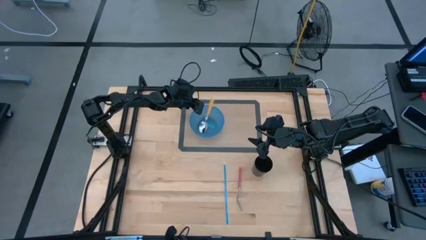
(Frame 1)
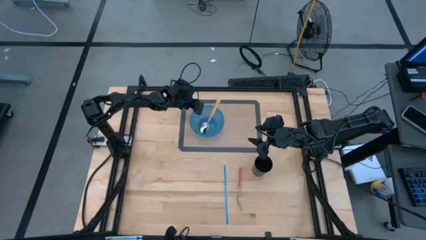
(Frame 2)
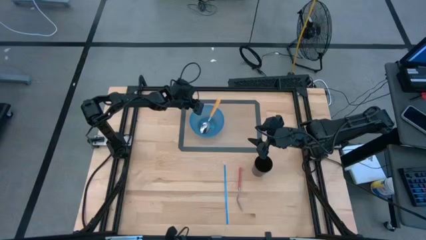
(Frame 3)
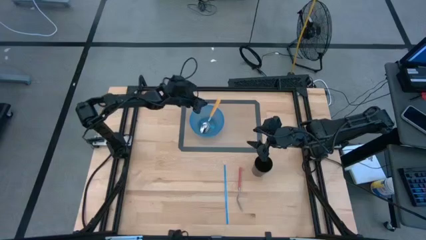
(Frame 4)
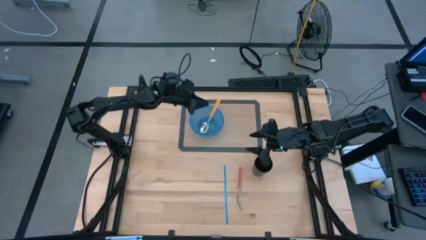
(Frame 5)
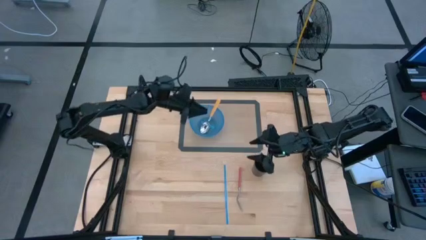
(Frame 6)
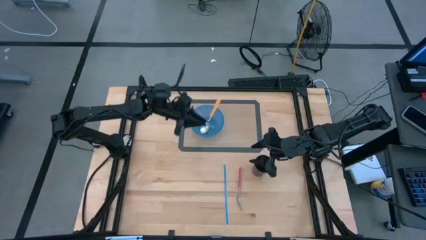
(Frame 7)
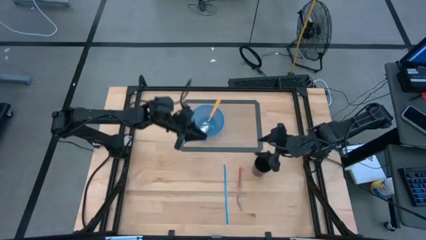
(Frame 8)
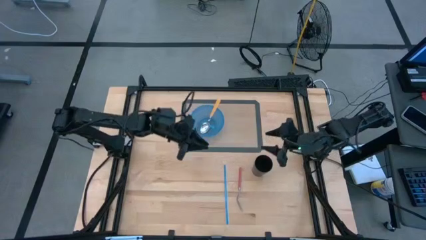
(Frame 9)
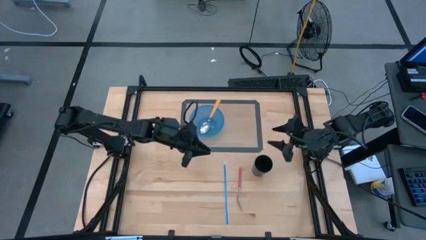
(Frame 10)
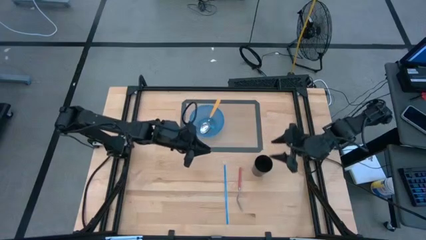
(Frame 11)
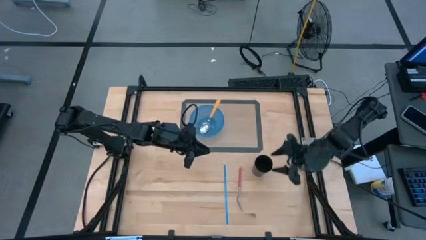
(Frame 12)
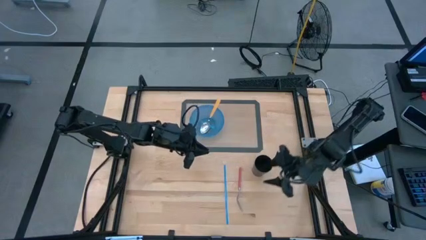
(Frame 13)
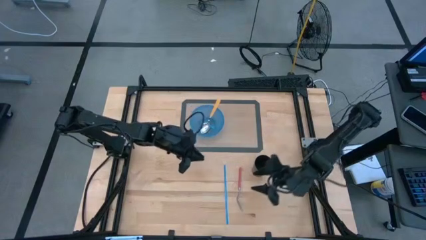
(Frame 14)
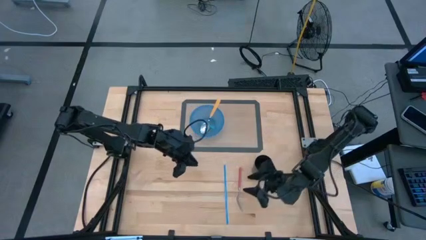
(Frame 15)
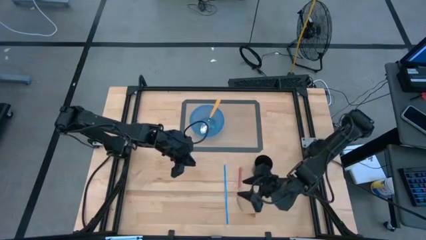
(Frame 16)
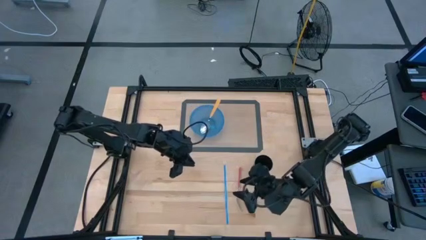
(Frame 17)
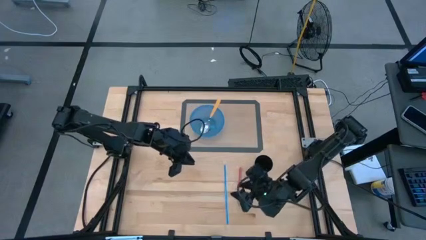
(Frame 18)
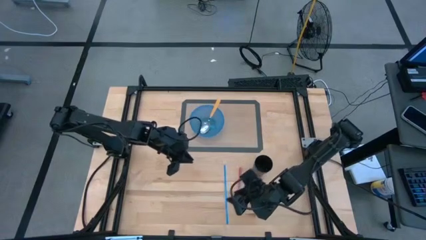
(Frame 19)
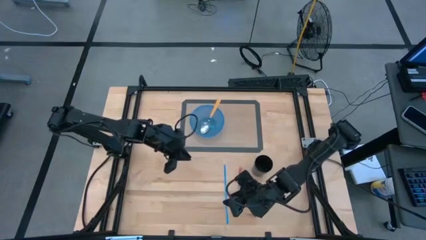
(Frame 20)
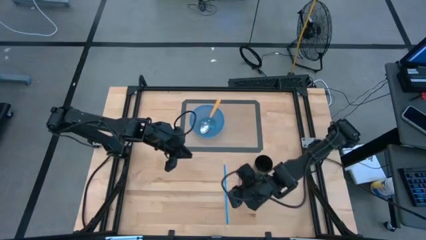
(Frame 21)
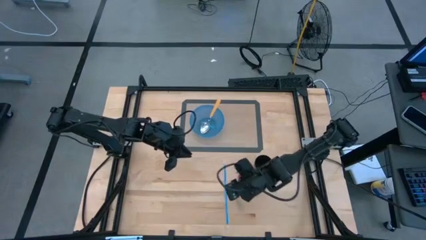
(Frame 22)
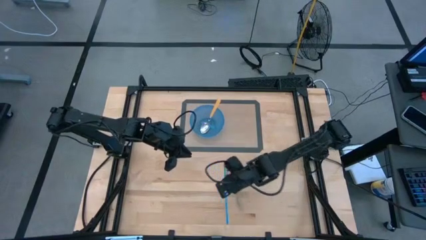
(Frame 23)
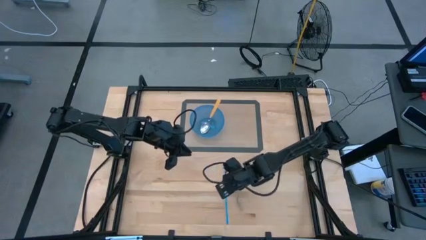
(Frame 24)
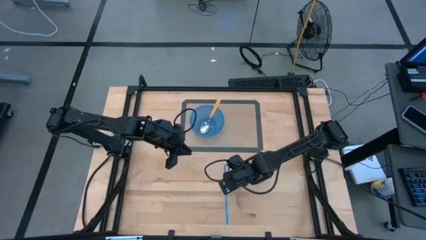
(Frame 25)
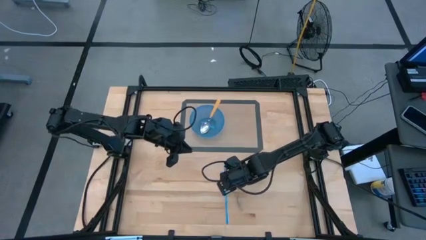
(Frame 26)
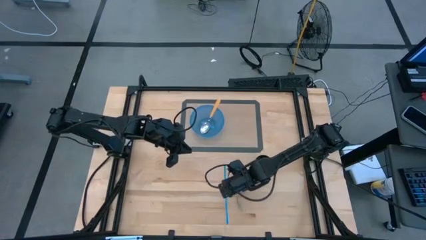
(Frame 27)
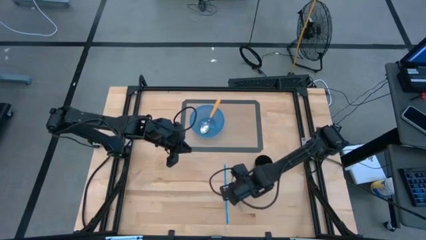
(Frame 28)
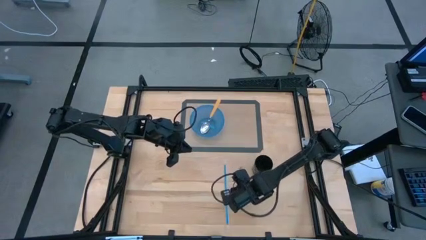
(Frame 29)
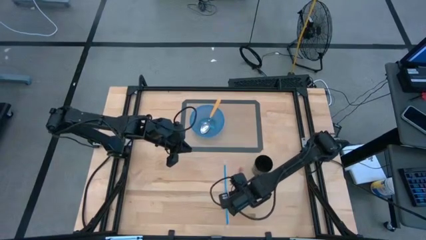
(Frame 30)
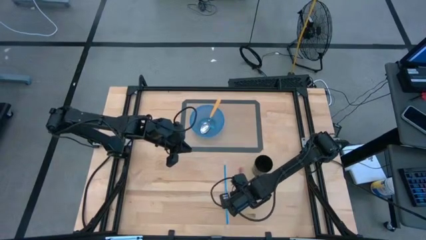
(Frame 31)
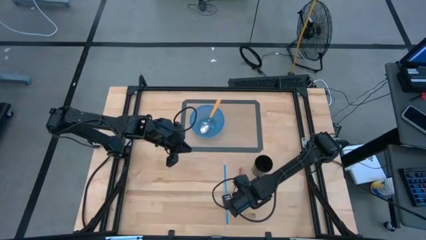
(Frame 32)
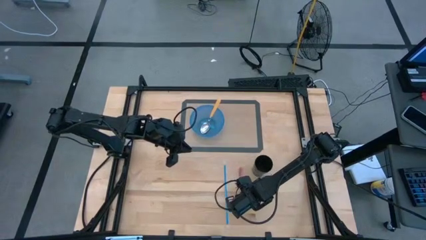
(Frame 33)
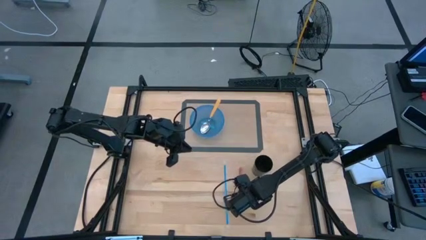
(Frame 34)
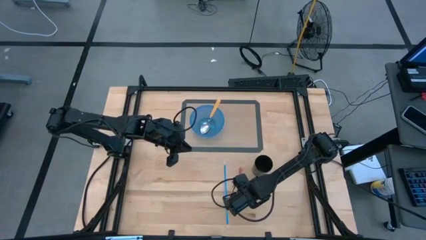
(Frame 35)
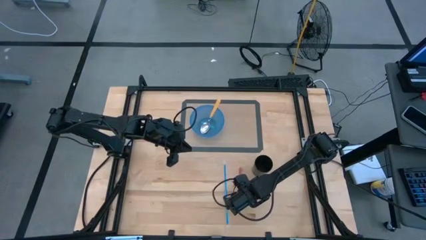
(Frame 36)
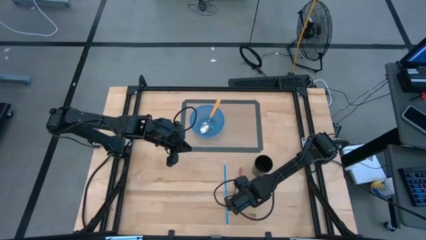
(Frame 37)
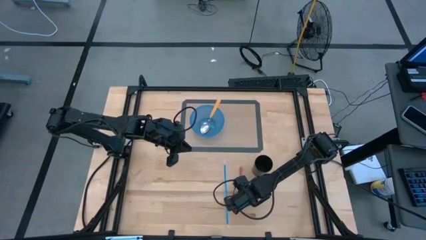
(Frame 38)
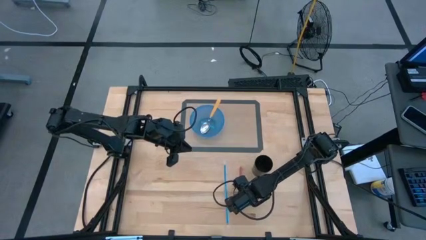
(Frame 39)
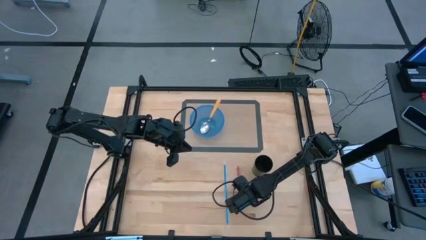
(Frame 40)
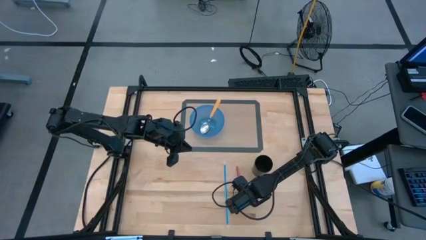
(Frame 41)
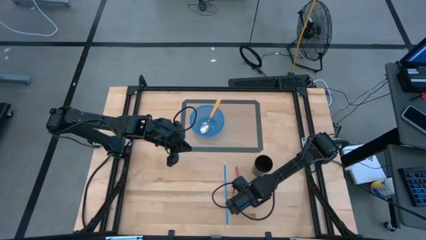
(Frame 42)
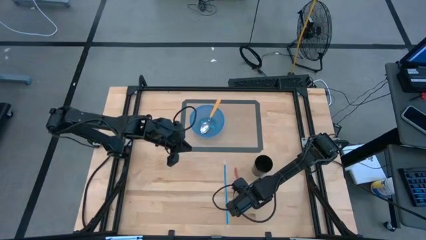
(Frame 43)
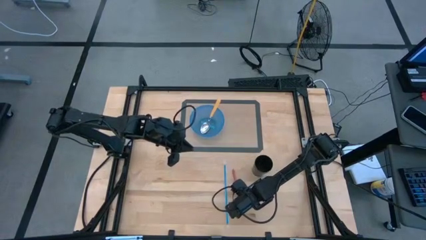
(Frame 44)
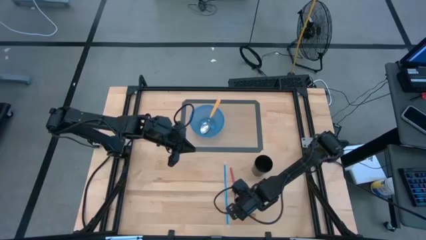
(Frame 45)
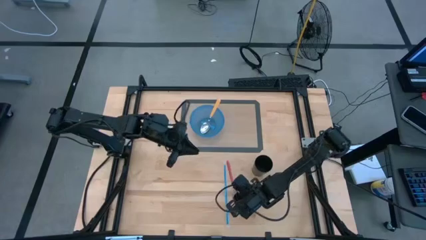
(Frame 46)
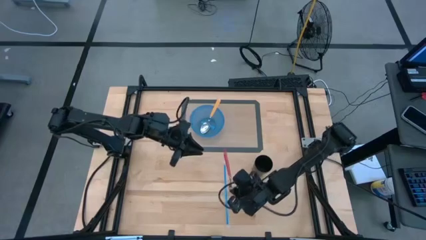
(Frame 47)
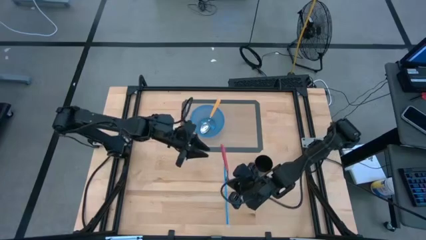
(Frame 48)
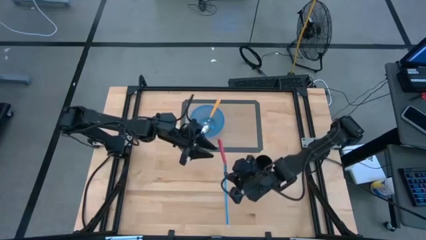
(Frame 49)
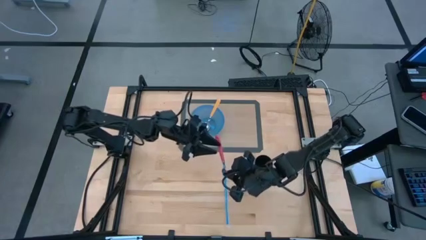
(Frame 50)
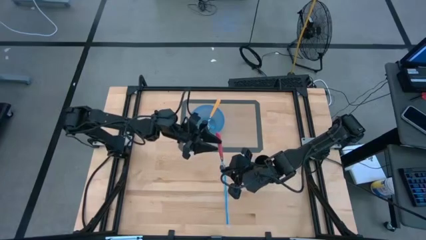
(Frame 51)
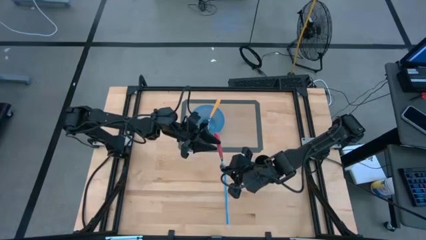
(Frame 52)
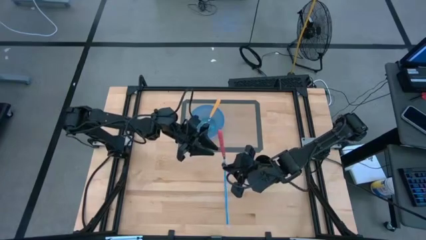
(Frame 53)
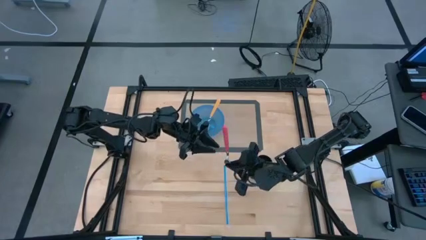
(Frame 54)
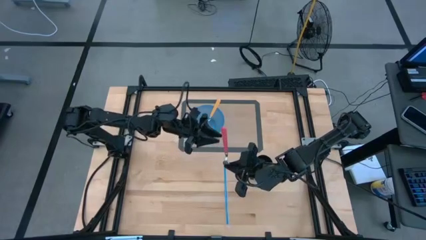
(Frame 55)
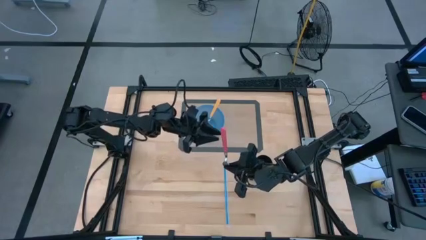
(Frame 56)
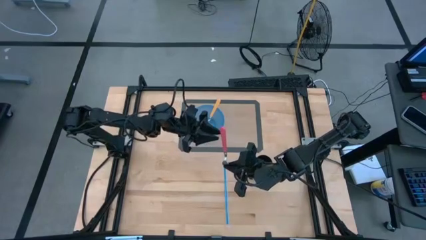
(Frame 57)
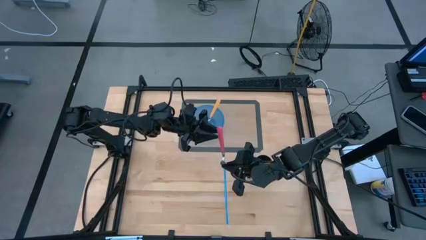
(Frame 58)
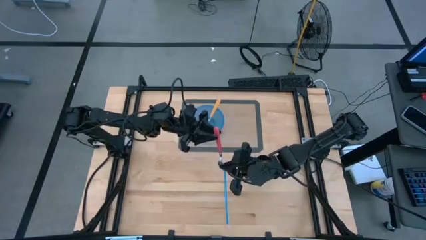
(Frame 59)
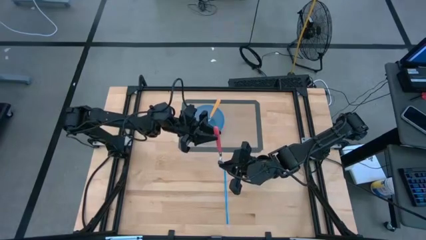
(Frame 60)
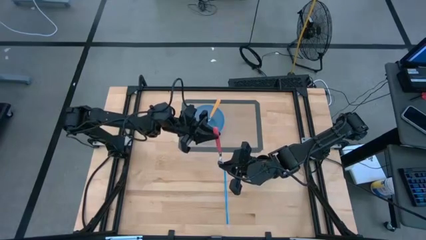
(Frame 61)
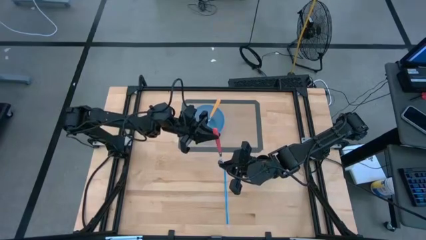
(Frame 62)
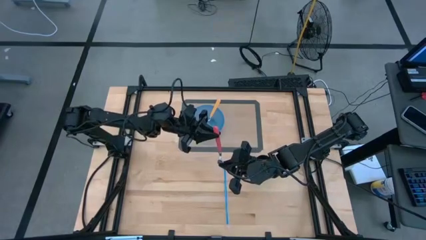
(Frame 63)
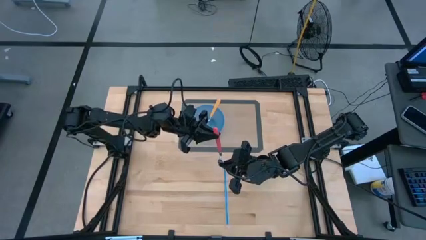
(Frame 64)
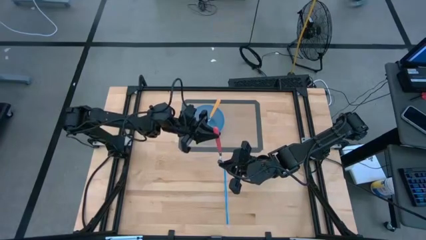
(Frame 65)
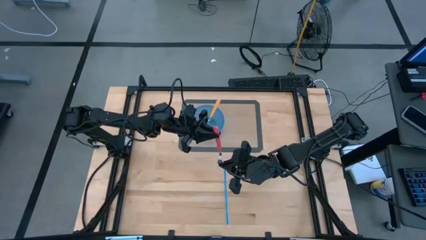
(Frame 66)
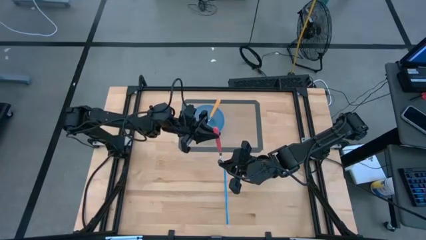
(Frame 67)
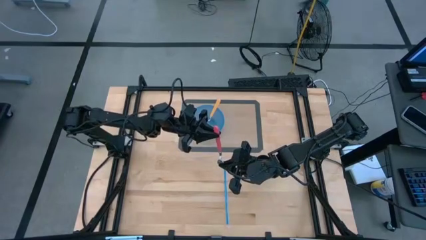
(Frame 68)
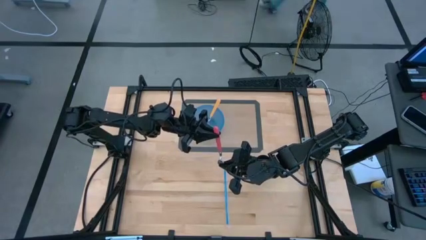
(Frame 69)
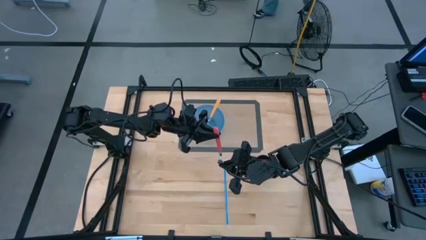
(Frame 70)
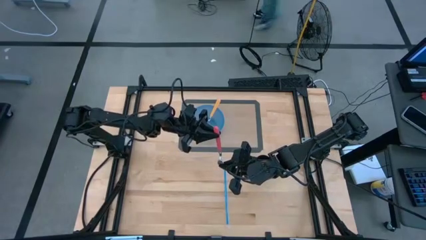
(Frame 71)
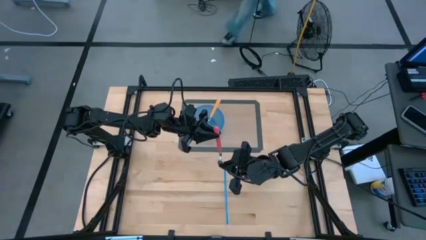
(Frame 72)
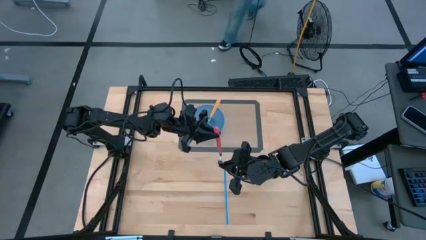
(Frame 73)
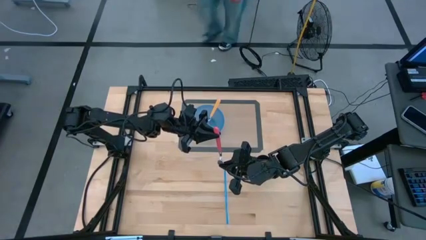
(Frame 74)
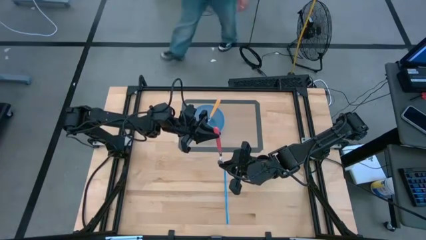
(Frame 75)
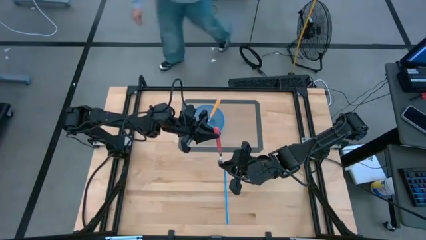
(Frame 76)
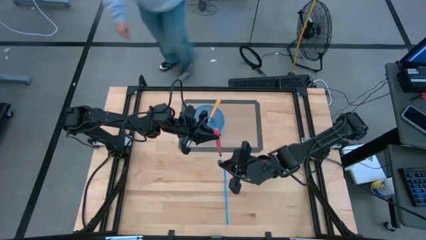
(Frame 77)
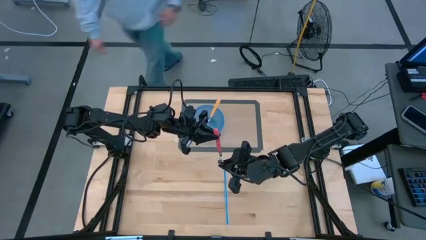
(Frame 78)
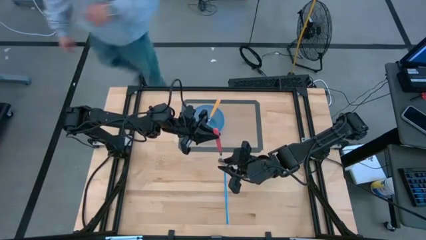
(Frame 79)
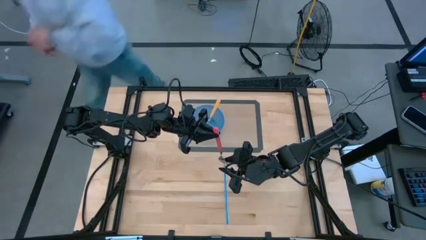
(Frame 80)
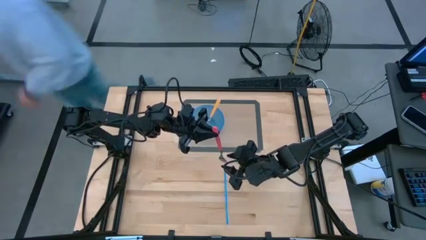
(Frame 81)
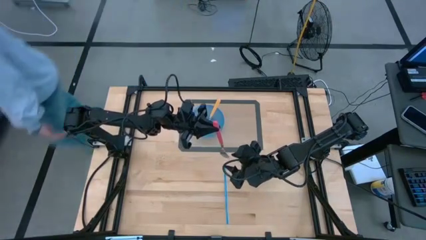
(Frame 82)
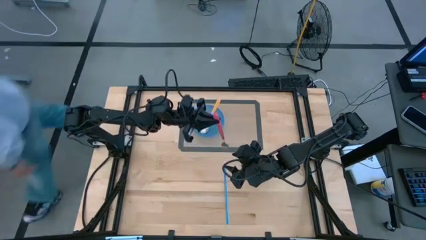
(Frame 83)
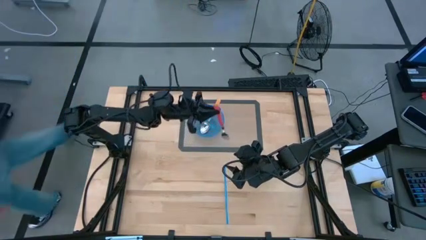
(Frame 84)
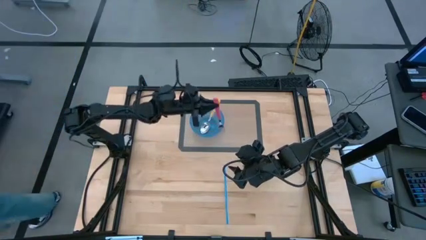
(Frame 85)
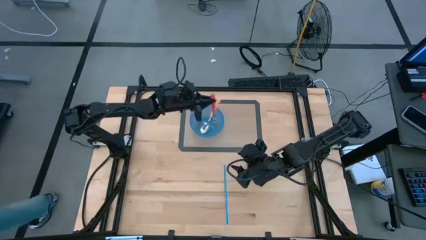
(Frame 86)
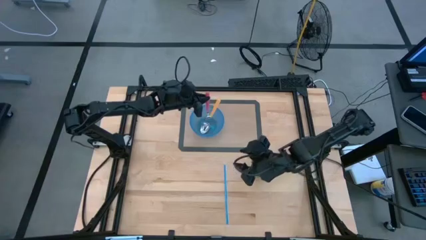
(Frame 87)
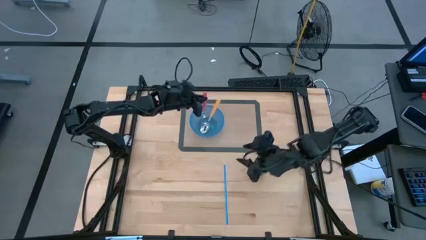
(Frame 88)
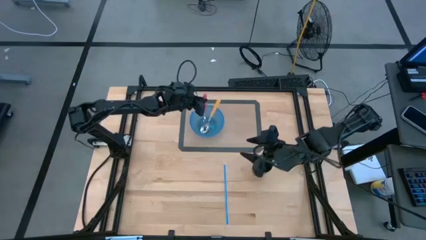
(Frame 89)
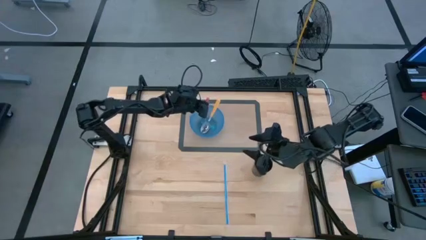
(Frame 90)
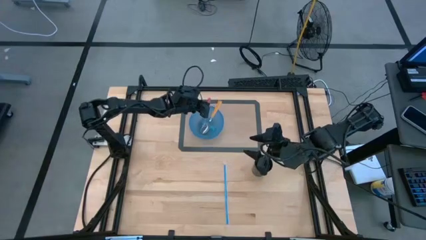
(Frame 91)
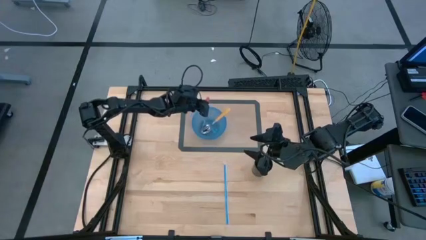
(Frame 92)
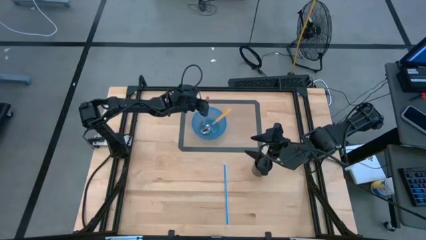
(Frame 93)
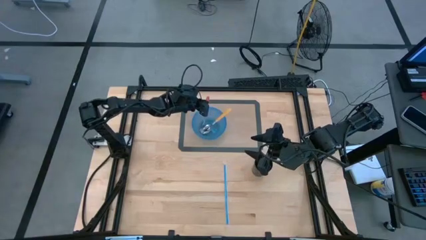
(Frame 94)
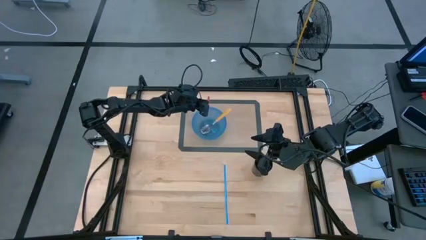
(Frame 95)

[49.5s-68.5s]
Task: Pick & Place Utensil
Put the pink fork into the bowl
